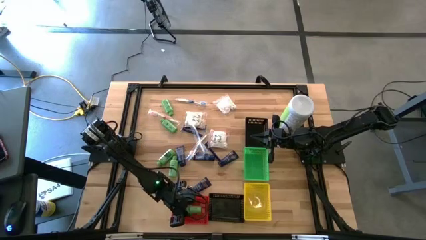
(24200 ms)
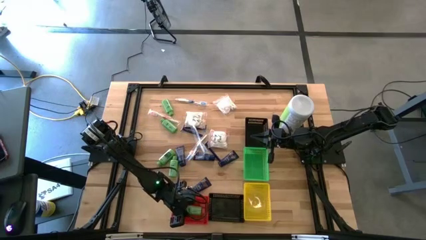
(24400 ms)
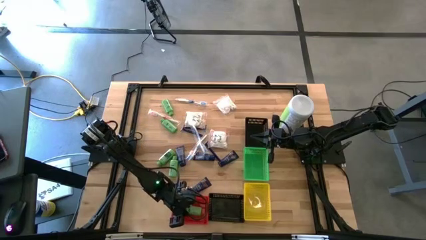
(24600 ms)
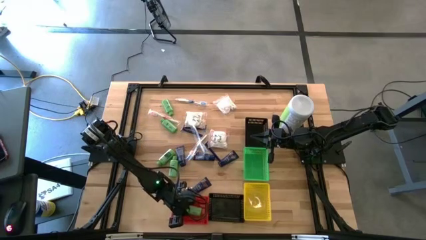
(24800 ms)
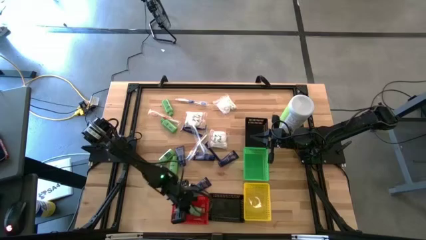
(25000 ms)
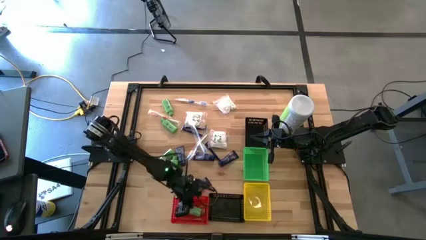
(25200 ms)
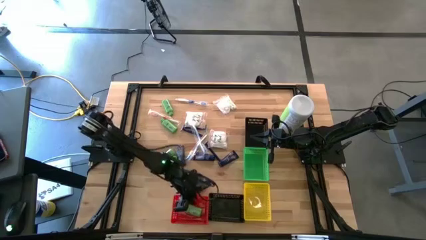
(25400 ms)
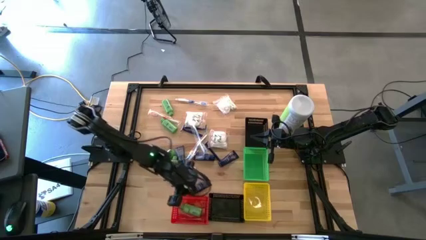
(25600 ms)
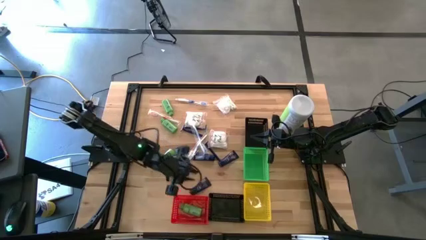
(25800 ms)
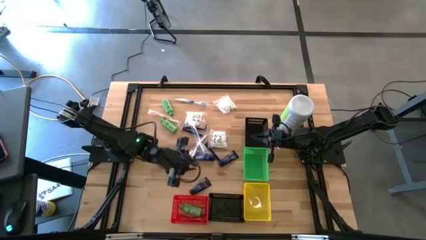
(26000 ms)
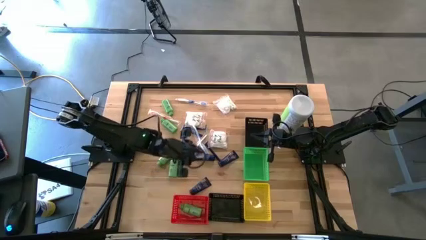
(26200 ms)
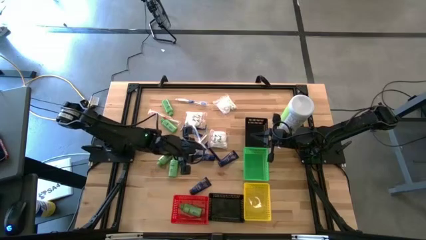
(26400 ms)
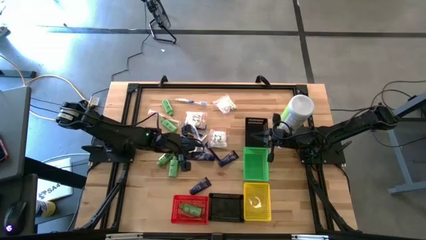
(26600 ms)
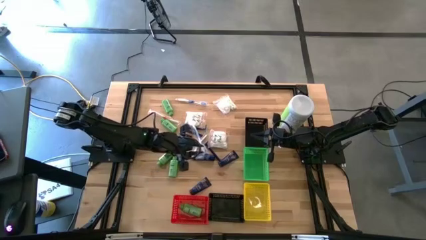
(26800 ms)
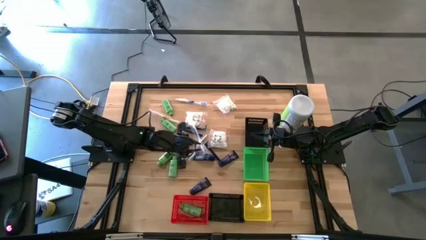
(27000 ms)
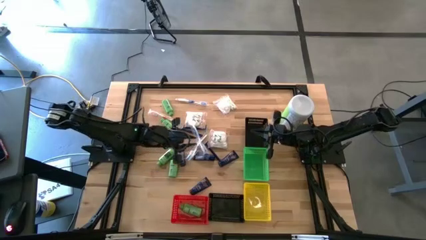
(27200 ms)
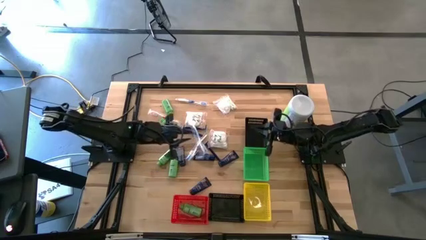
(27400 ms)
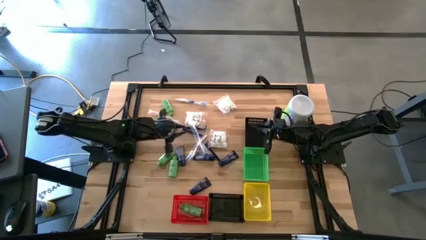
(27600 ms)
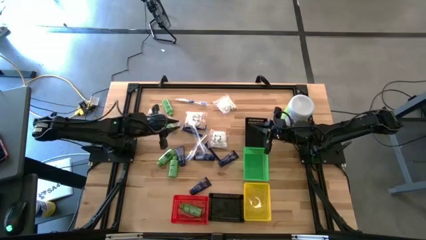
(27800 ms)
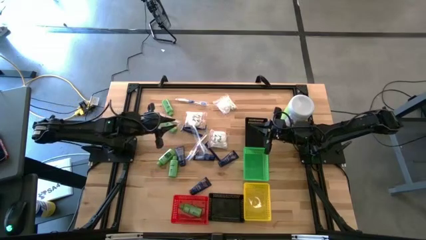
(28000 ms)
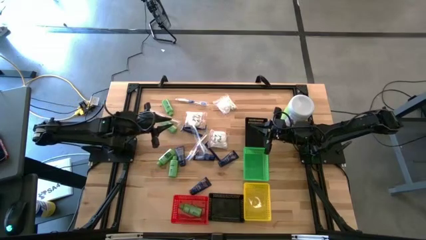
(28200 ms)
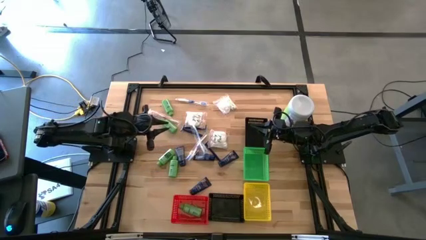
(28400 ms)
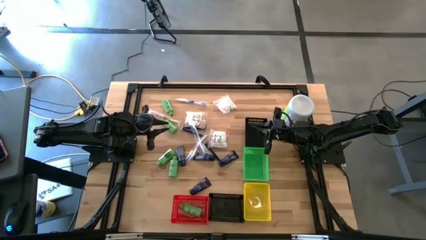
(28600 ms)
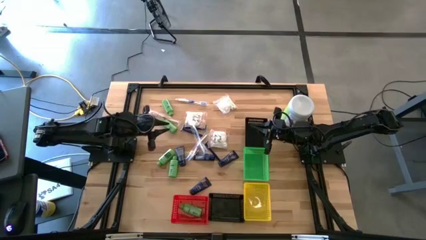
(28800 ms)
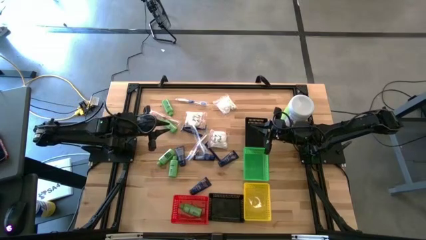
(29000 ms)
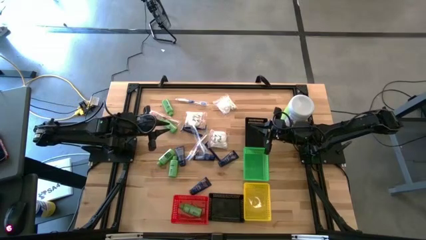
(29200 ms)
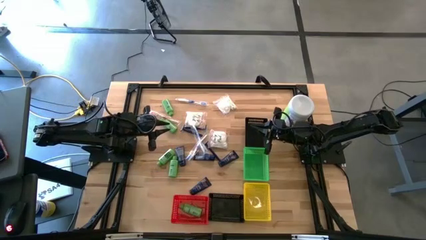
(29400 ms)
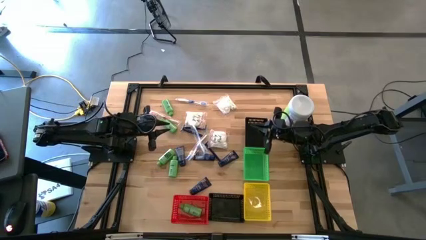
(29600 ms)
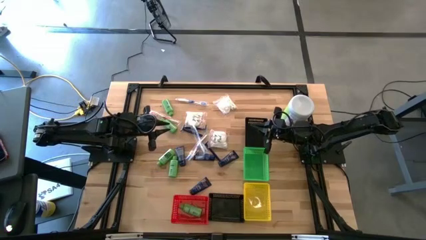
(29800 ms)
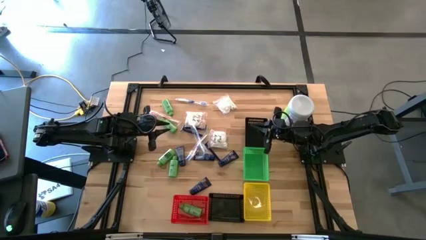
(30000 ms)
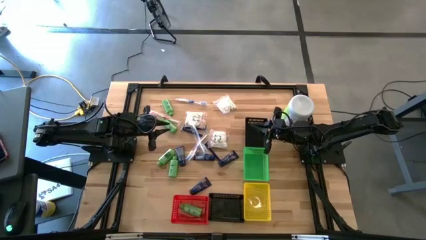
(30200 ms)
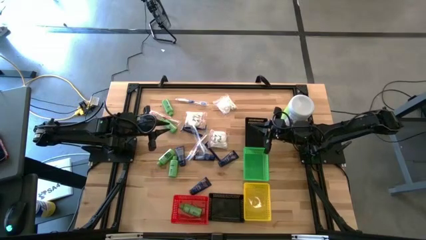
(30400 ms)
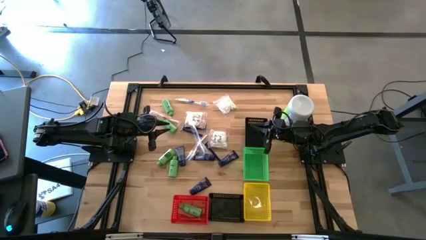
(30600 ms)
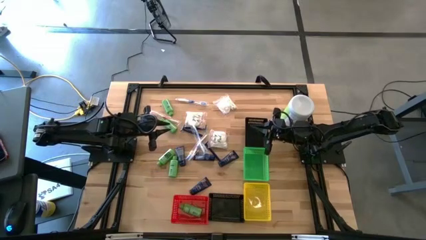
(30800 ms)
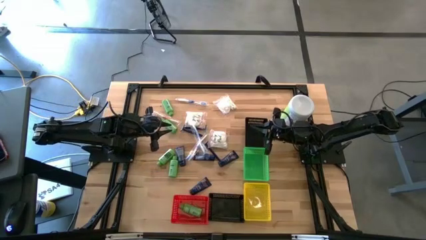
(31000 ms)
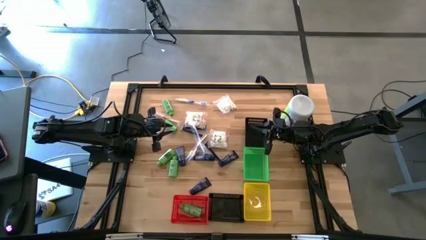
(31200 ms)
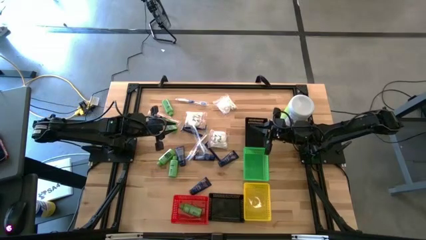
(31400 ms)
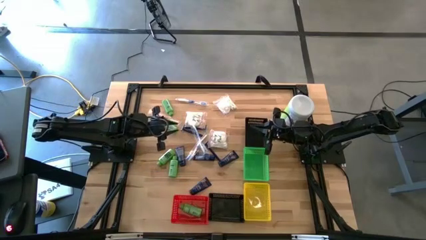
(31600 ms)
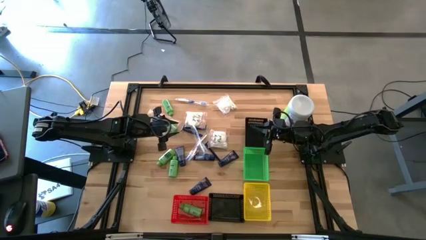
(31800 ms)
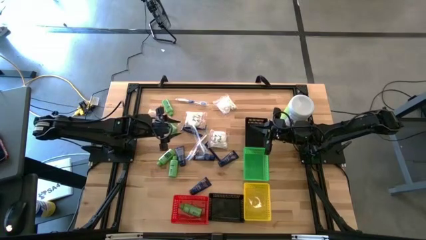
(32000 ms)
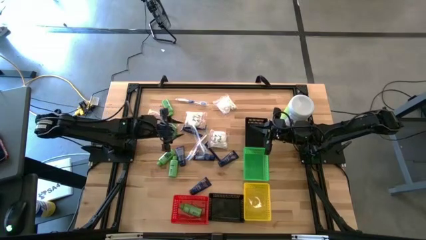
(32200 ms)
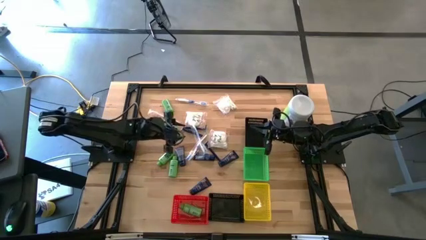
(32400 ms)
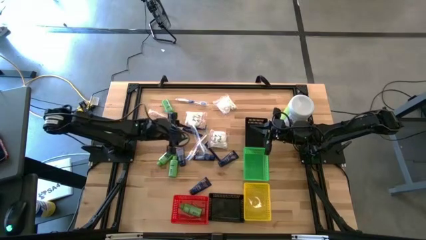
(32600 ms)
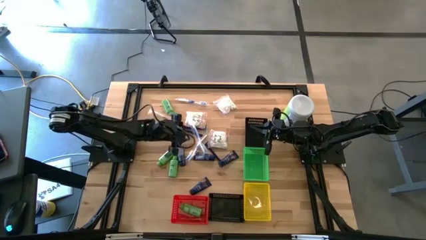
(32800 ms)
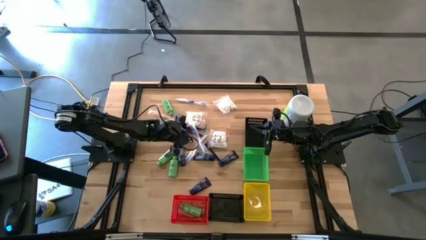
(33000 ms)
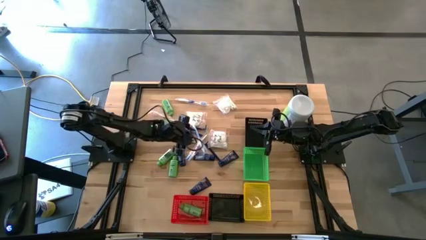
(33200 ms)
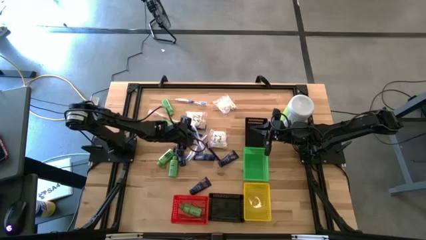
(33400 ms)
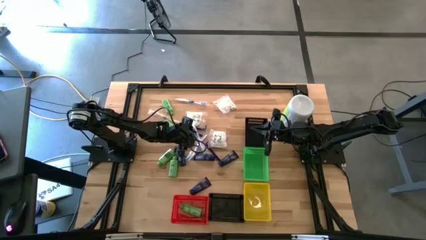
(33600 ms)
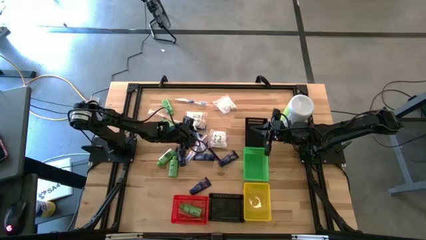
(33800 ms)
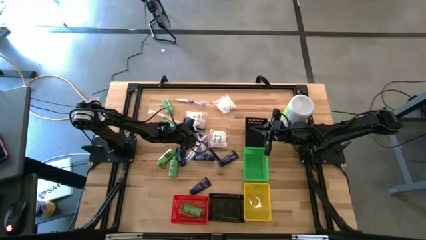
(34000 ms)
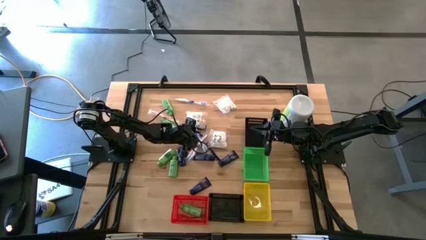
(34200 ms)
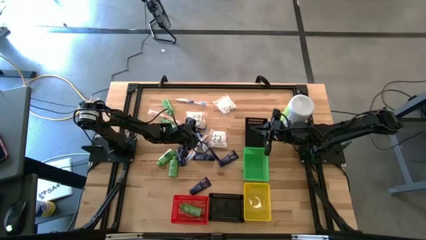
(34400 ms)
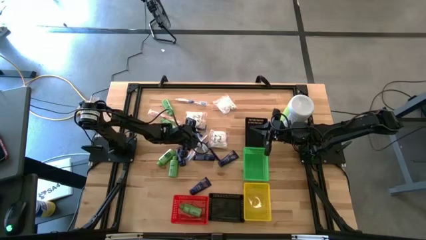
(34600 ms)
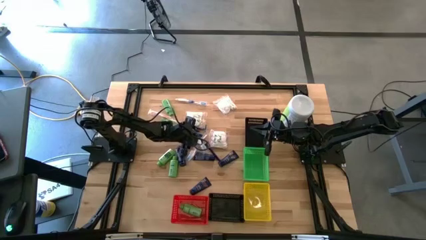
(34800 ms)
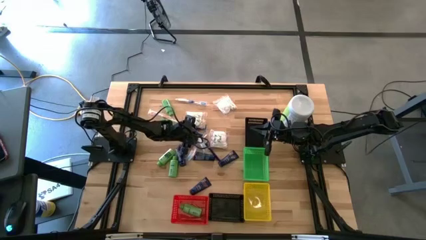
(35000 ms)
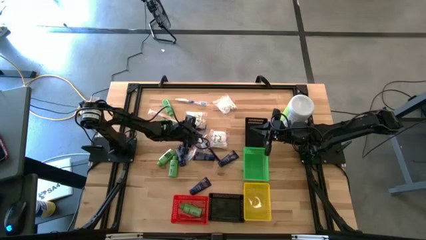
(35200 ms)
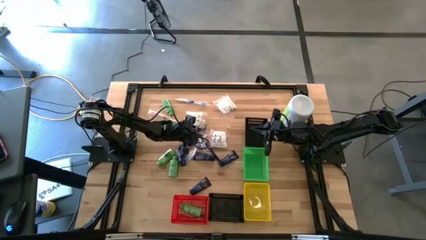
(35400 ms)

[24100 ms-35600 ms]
Task: Pick & Place Travel size toiletries
Put the top blue toothbrush into the bottom black bin
